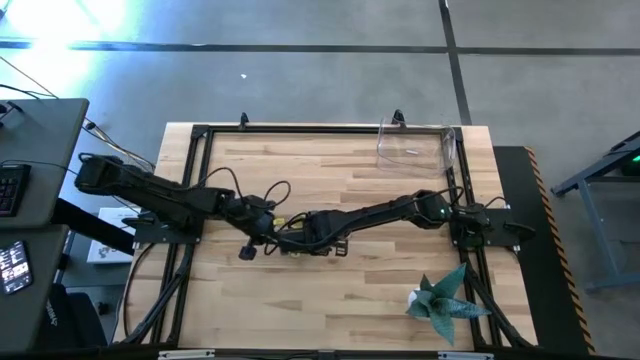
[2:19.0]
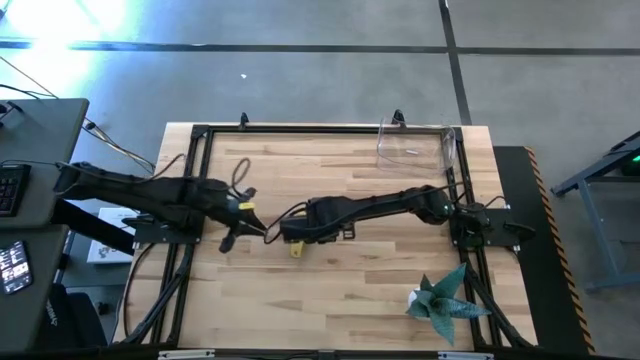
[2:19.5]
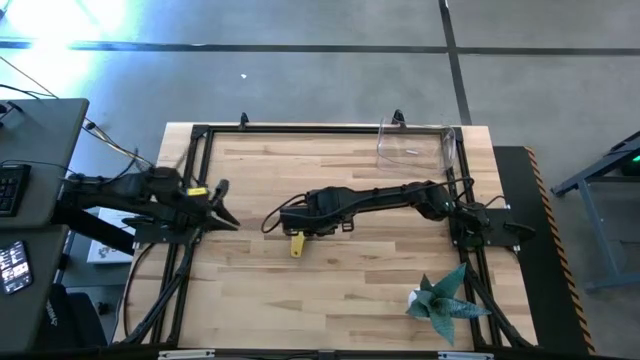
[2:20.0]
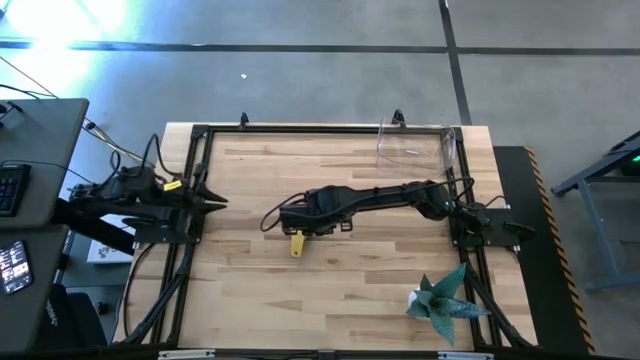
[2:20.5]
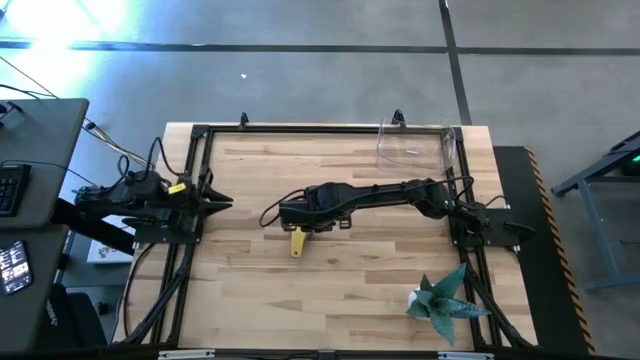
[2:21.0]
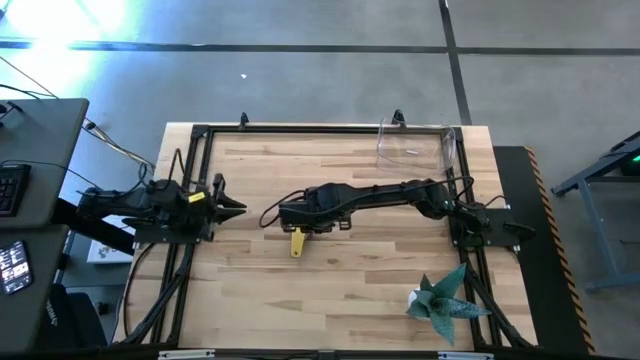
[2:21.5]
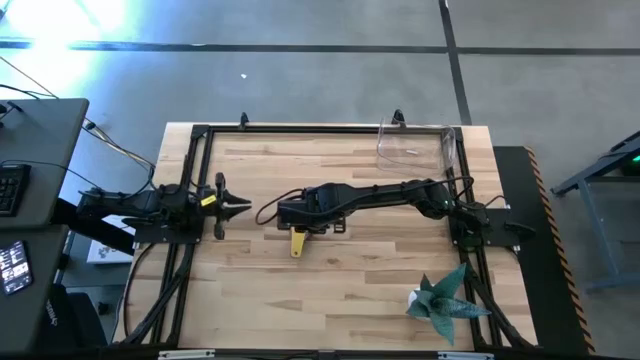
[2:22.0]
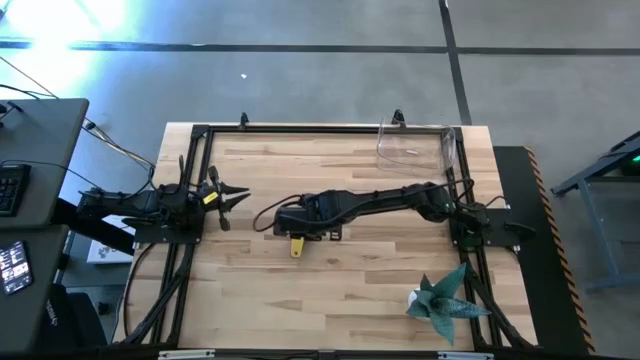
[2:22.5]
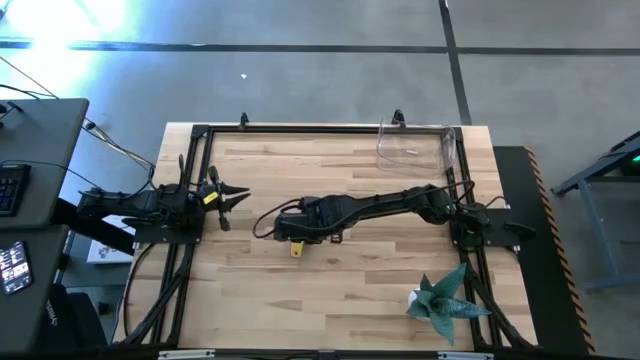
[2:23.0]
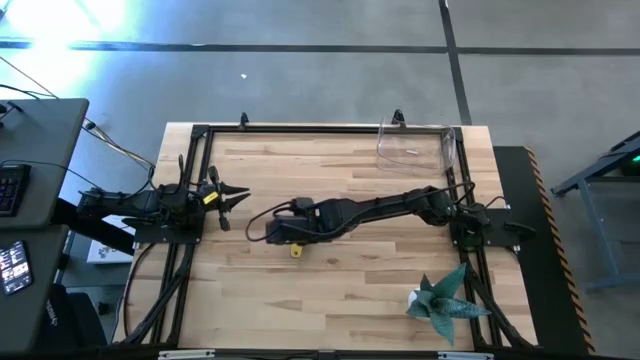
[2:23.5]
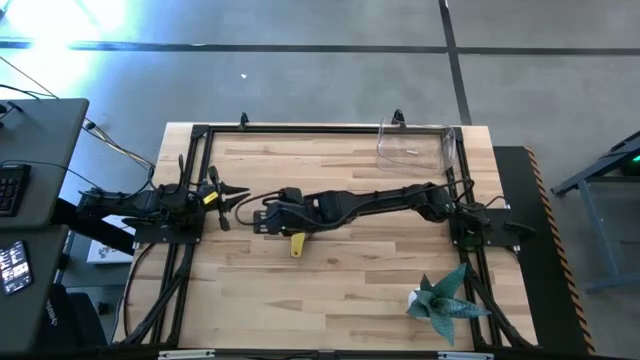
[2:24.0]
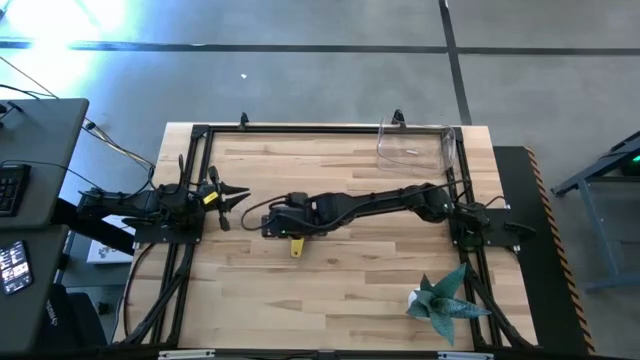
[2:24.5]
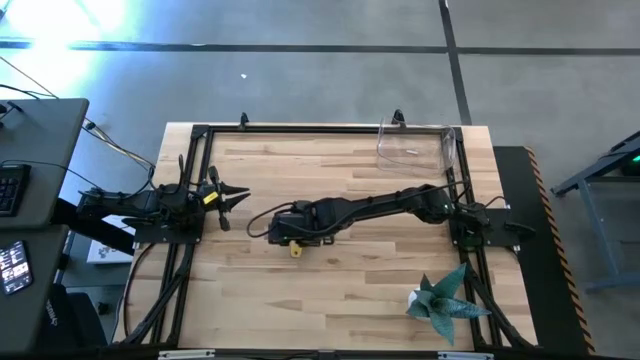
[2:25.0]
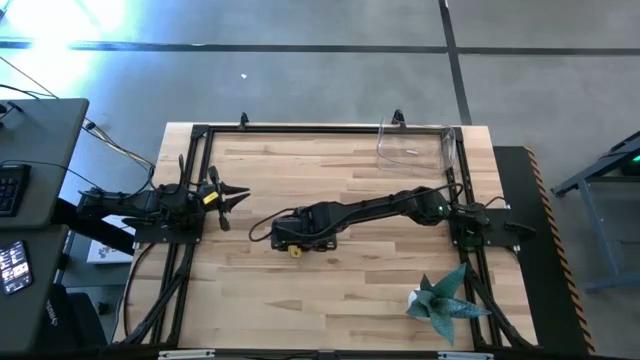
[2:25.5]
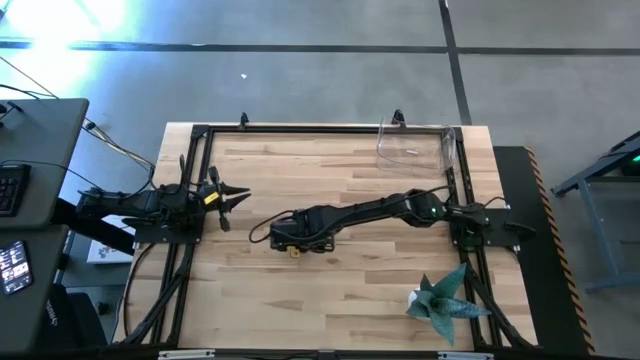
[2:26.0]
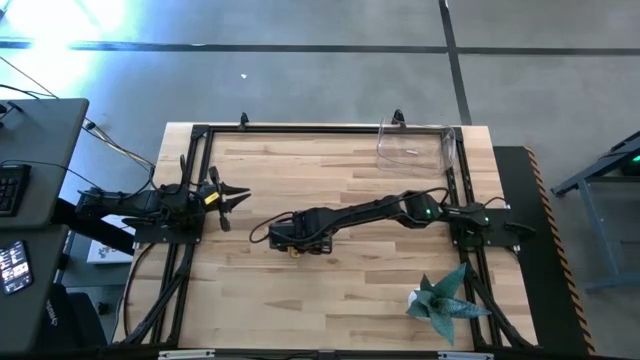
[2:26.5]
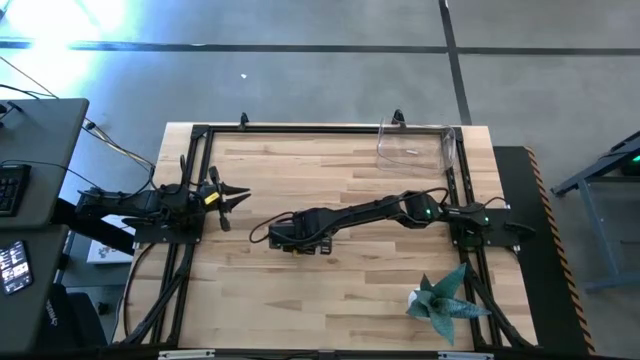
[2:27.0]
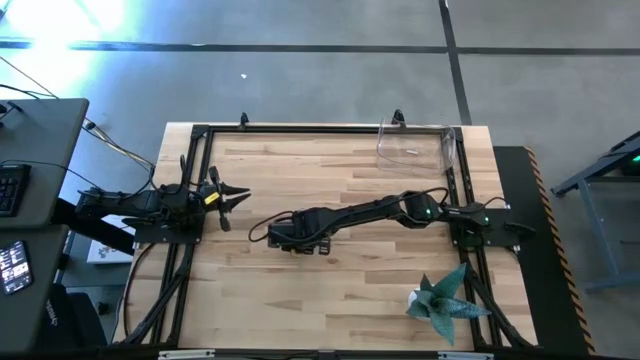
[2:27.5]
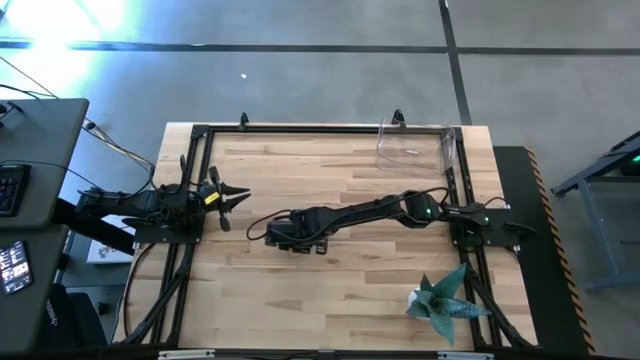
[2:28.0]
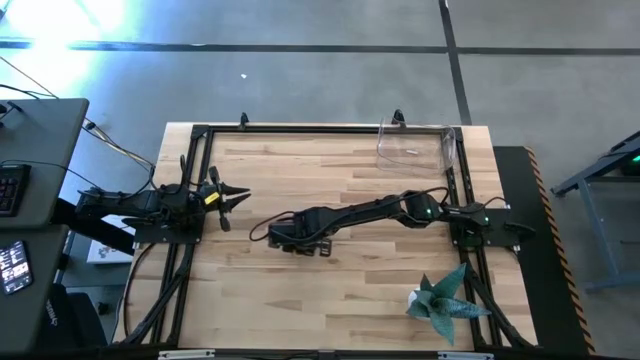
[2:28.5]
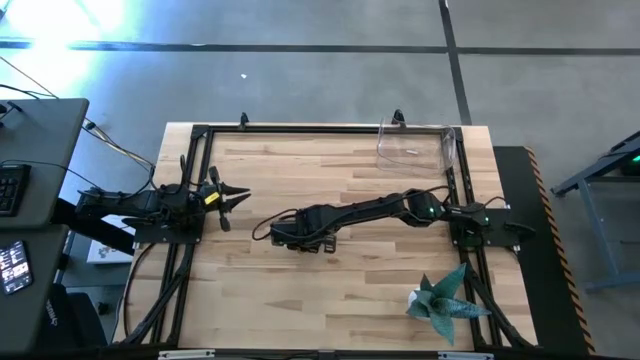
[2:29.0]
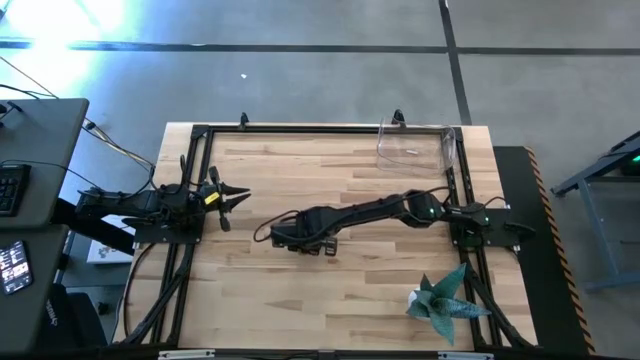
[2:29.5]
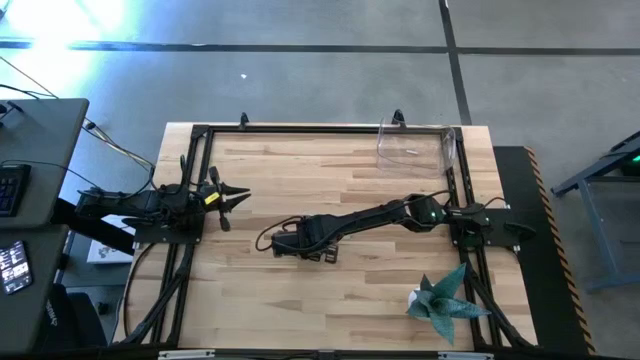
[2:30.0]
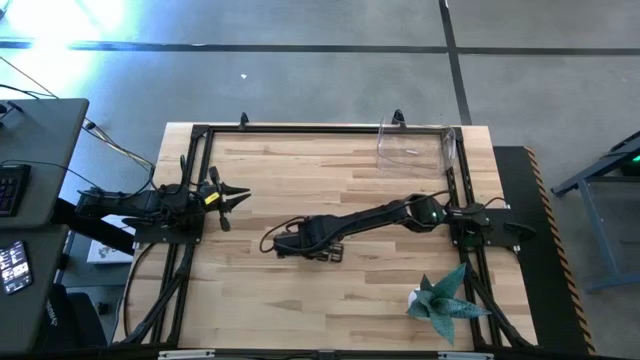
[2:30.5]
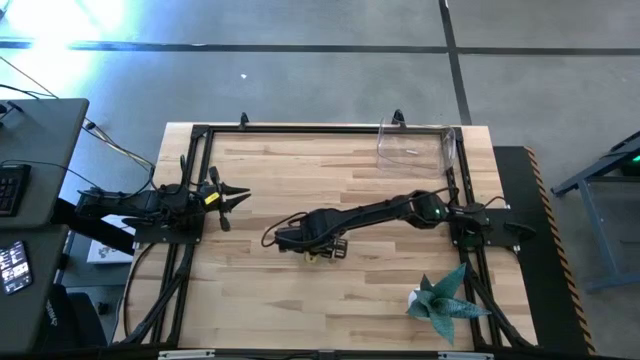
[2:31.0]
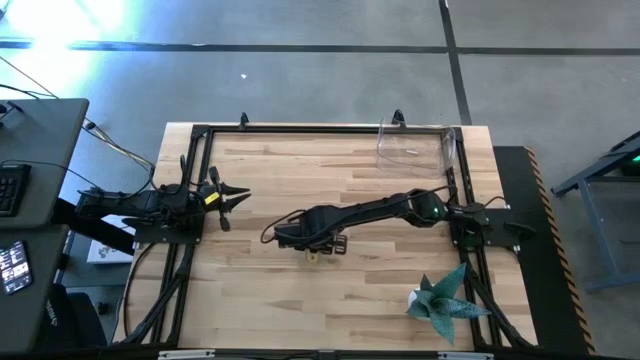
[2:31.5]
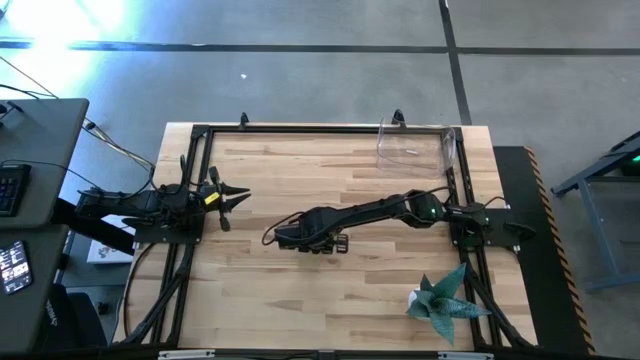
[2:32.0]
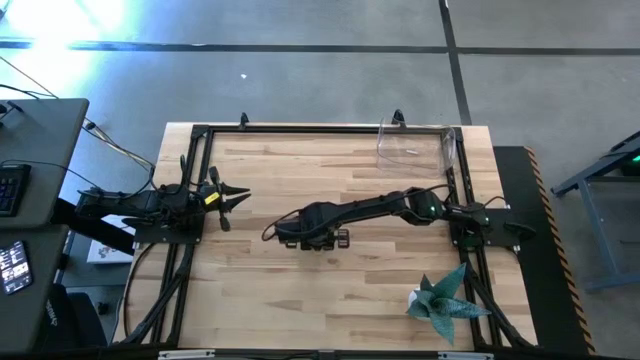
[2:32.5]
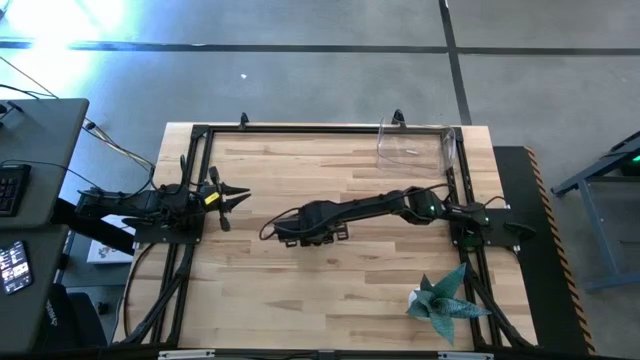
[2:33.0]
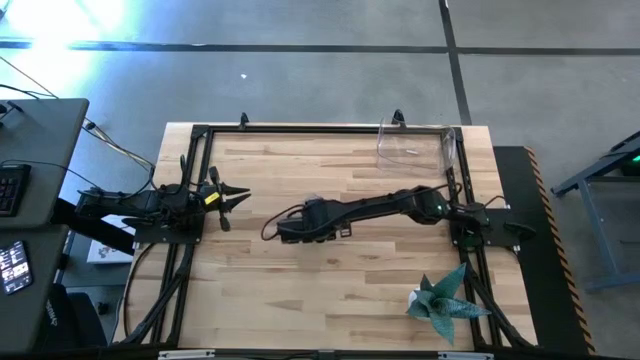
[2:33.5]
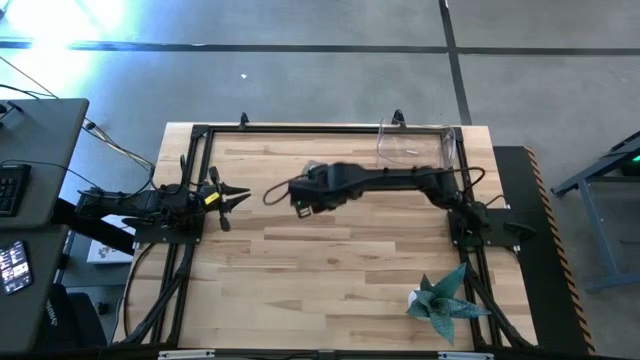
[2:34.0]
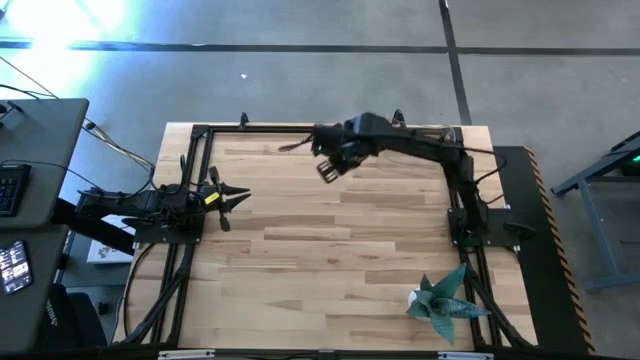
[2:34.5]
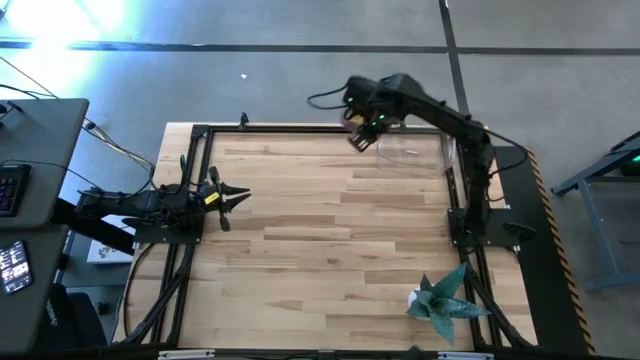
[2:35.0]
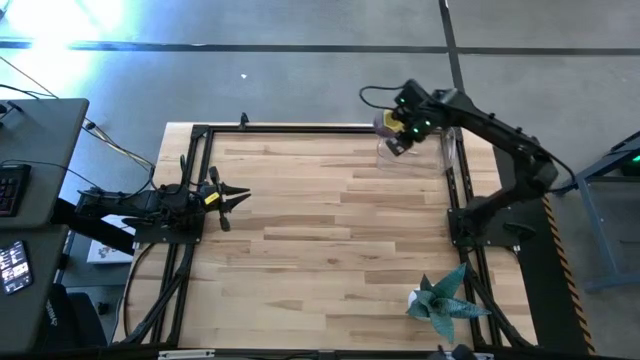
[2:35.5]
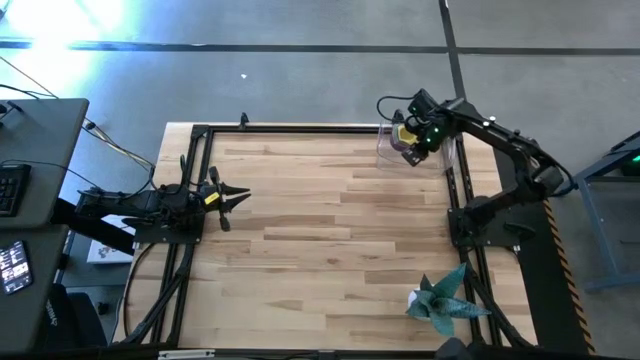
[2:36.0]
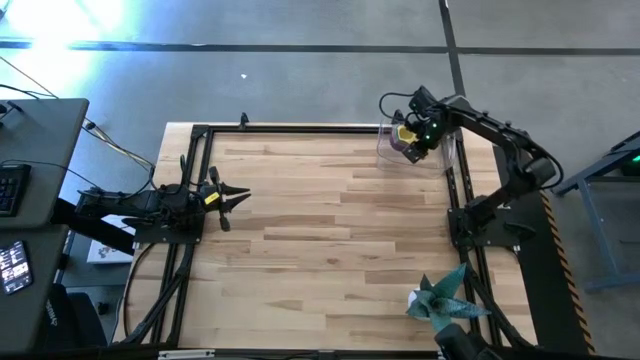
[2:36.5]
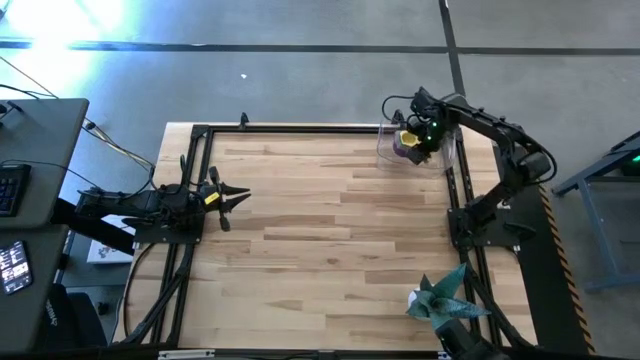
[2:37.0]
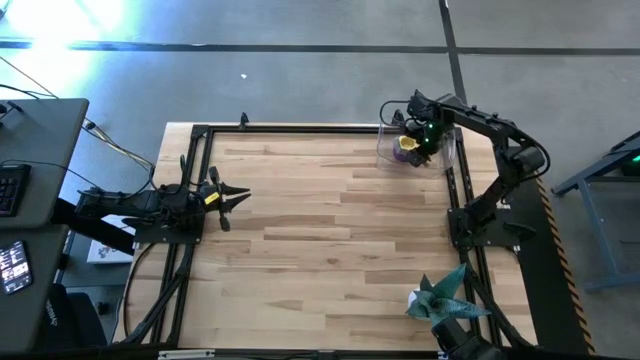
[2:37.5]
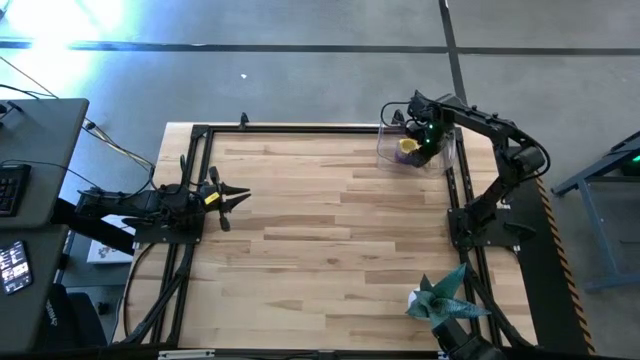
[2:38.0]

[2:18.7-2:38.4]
Task: Nest measuring cups in basket
Put the stacked measuring cups into the transparent bin

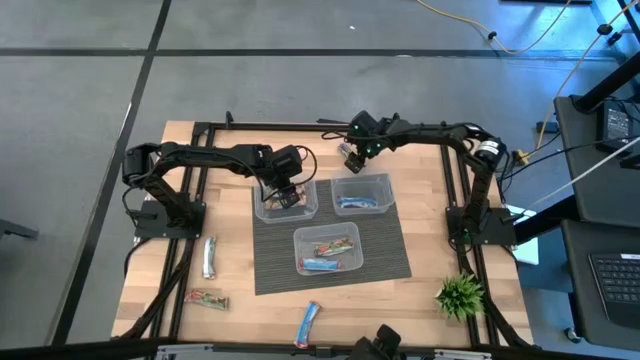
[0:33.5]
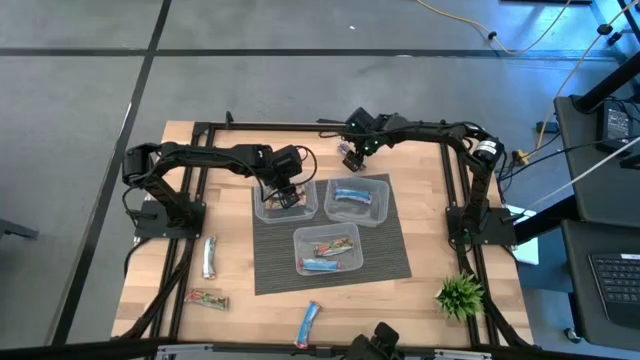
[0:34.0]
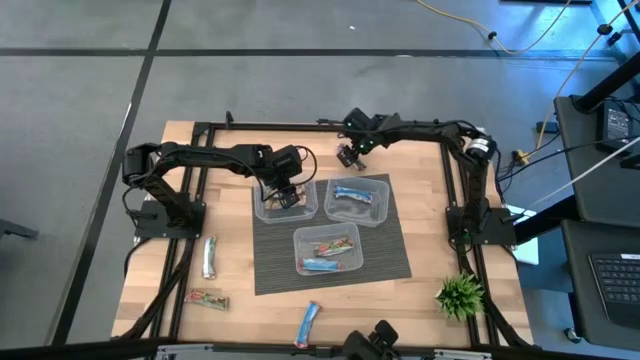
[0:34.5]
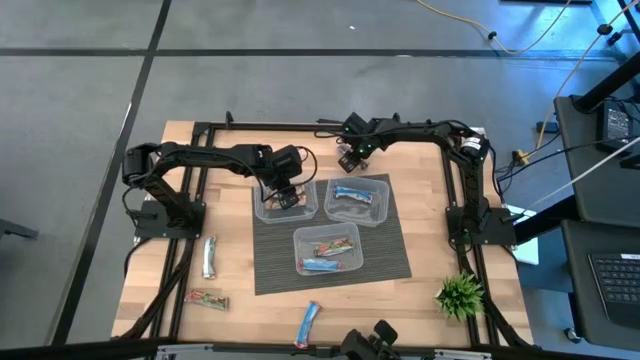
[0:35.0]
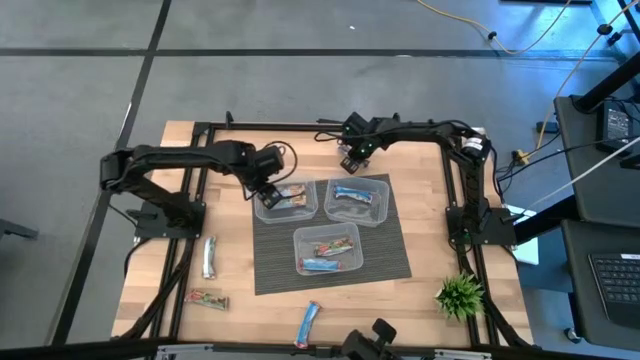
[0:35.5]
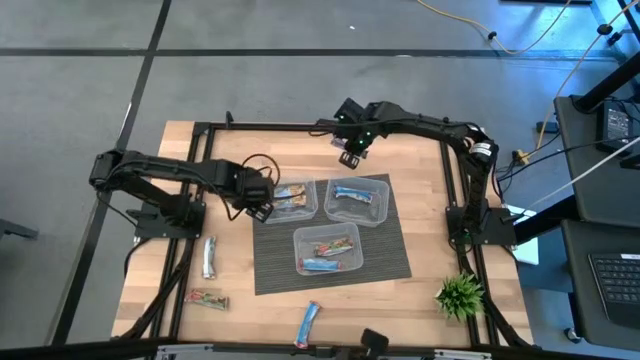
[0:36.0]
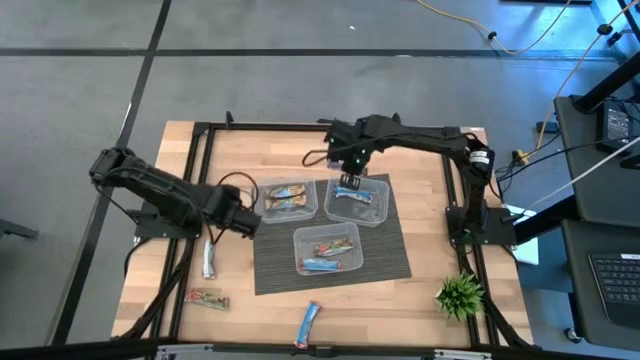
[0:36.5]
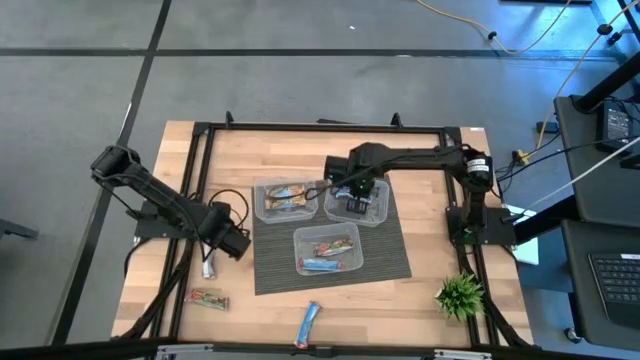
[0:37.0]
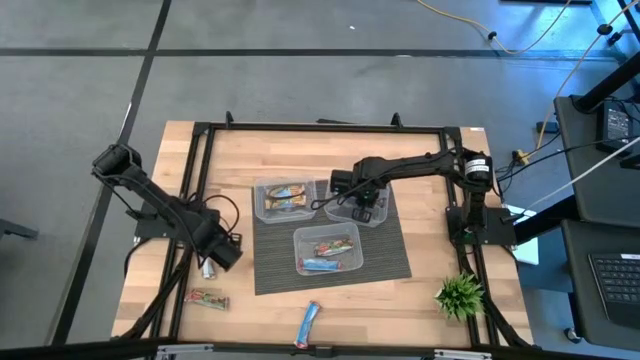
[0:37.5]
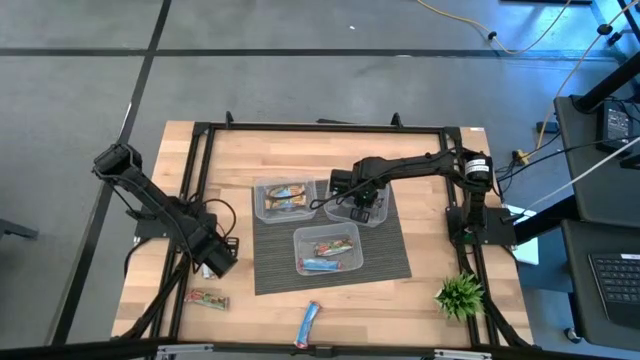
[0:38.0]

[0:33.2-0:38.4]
Task: Pick and place Granola Bars by type
Put the blue granola bar into the top right transparent bin
